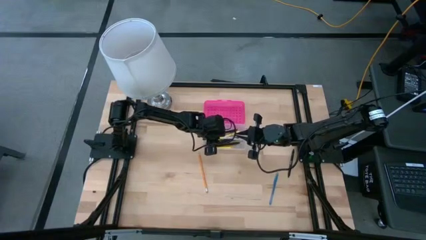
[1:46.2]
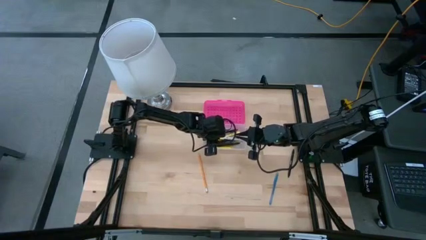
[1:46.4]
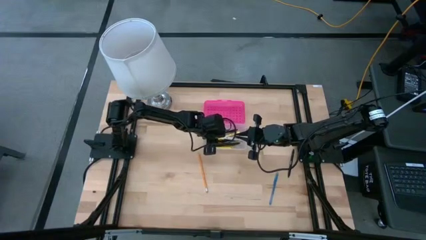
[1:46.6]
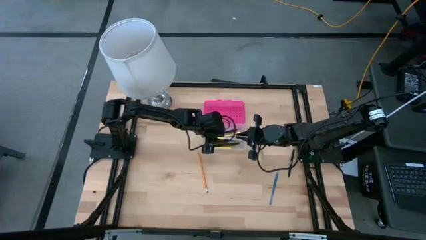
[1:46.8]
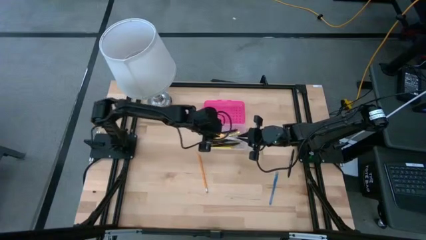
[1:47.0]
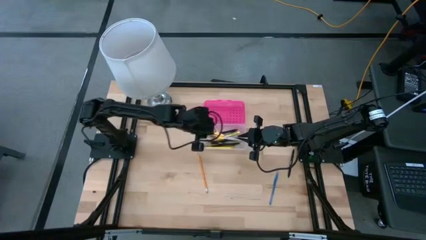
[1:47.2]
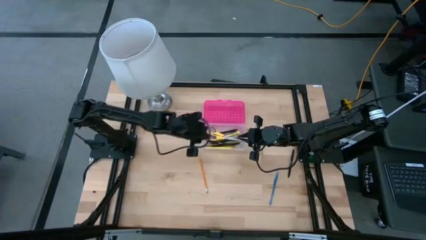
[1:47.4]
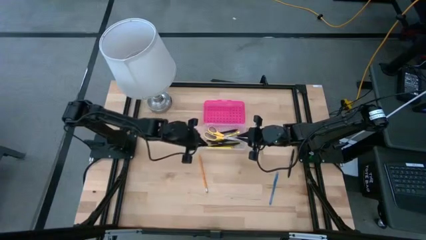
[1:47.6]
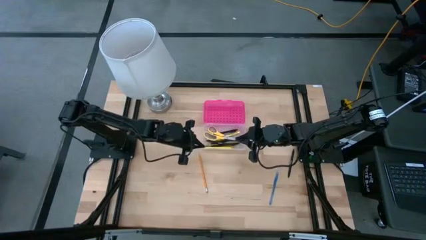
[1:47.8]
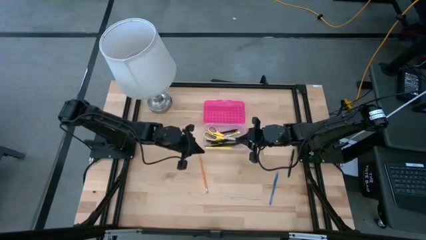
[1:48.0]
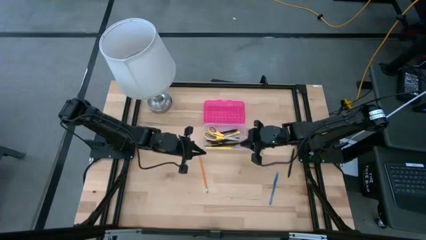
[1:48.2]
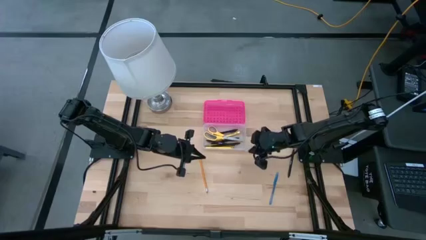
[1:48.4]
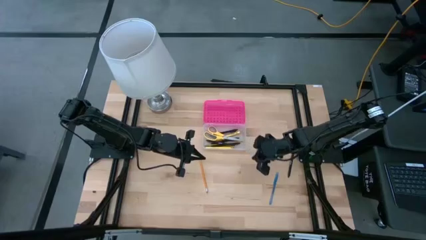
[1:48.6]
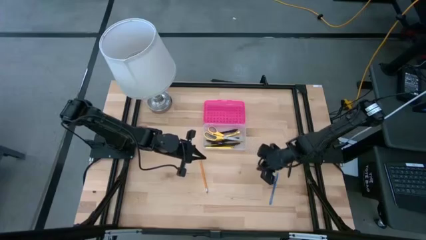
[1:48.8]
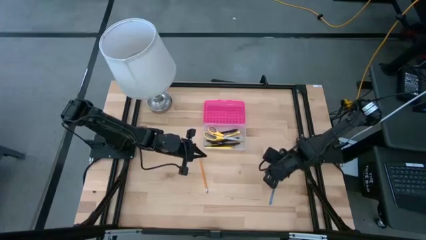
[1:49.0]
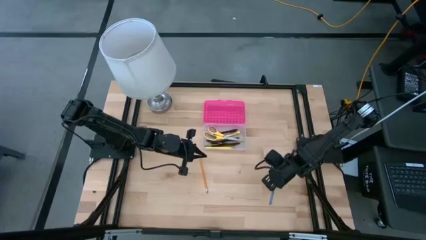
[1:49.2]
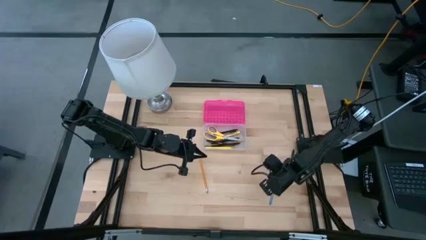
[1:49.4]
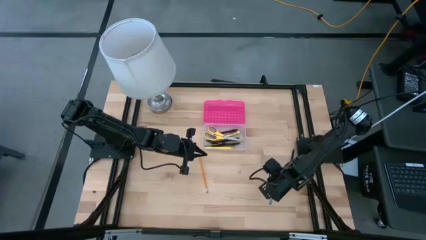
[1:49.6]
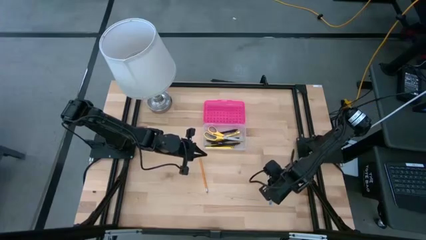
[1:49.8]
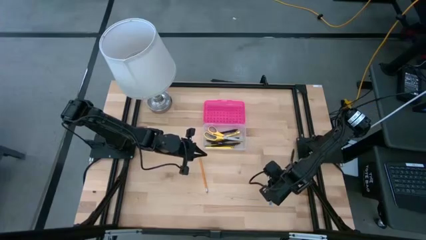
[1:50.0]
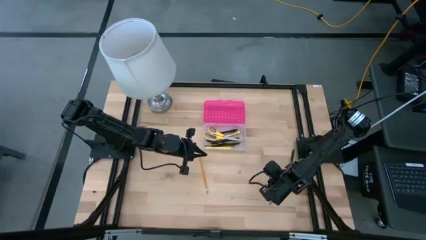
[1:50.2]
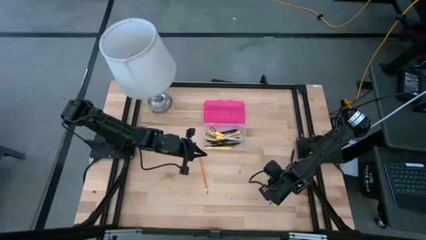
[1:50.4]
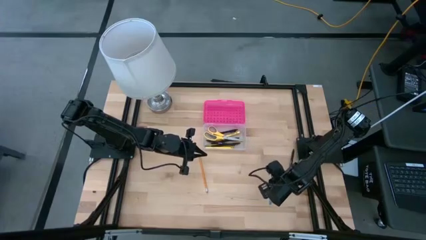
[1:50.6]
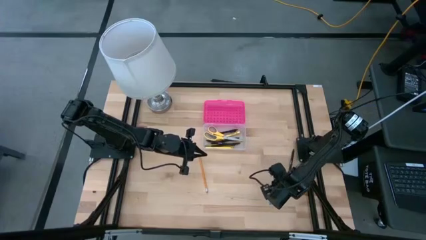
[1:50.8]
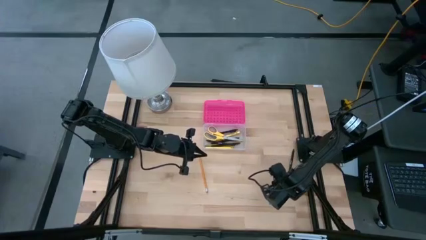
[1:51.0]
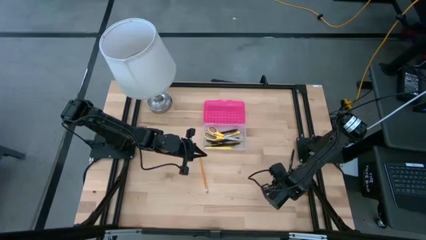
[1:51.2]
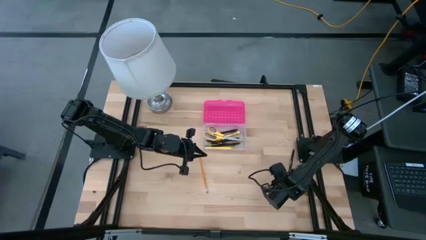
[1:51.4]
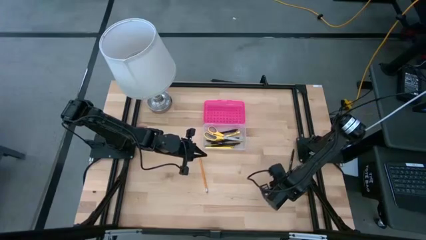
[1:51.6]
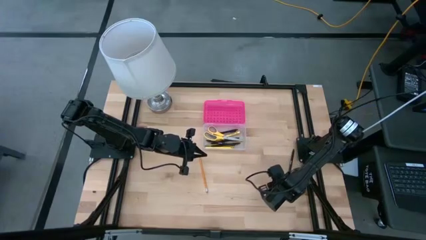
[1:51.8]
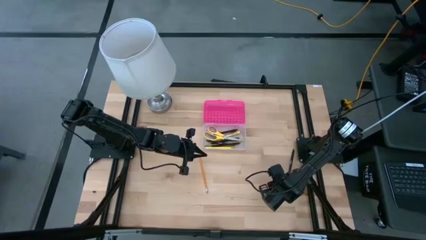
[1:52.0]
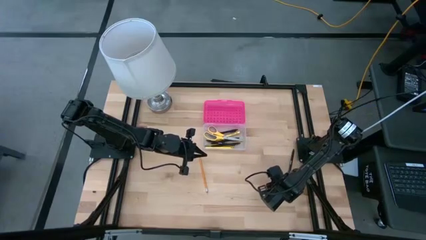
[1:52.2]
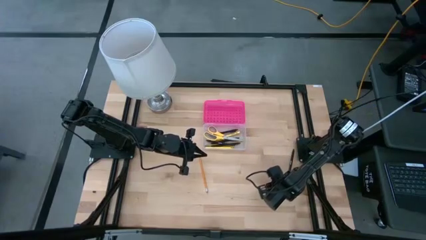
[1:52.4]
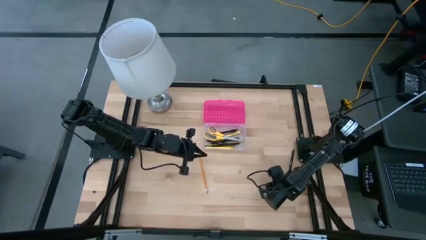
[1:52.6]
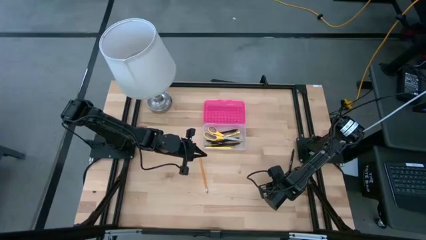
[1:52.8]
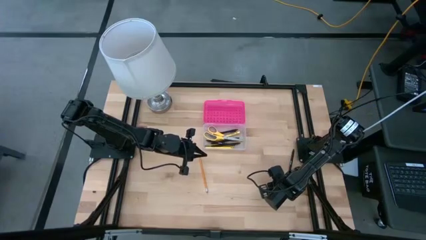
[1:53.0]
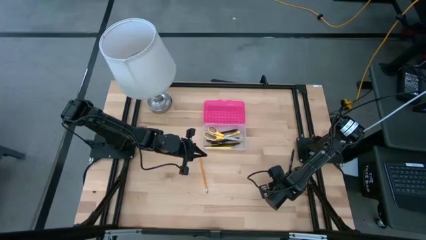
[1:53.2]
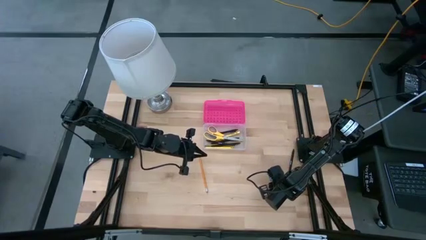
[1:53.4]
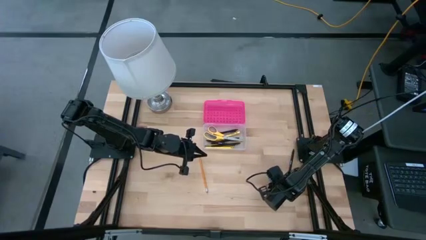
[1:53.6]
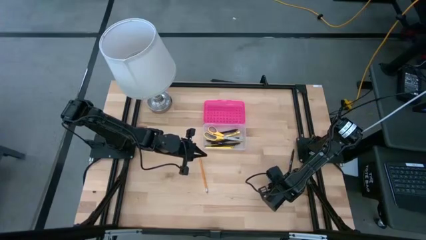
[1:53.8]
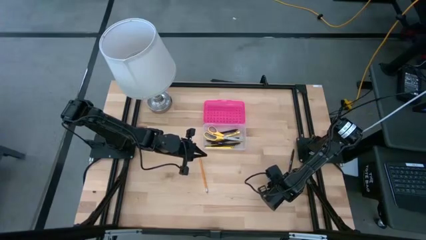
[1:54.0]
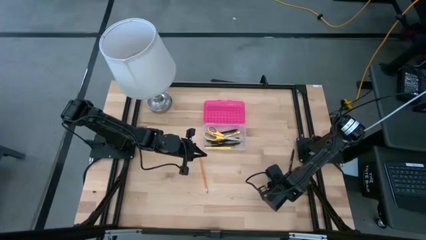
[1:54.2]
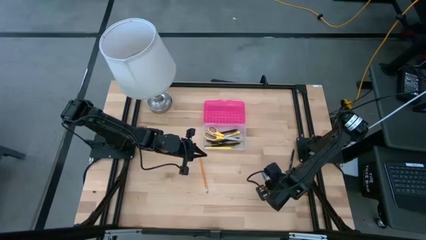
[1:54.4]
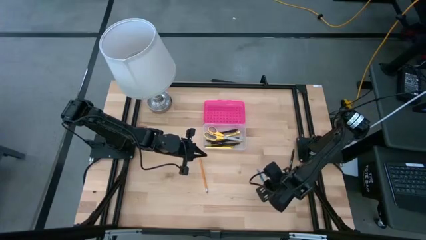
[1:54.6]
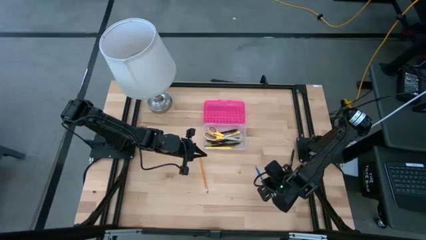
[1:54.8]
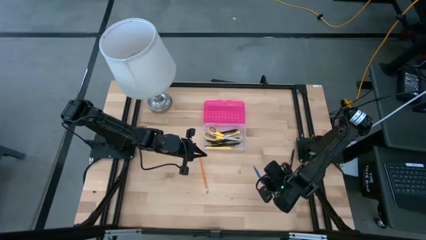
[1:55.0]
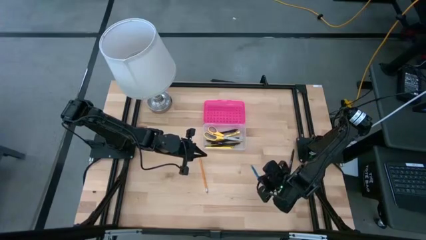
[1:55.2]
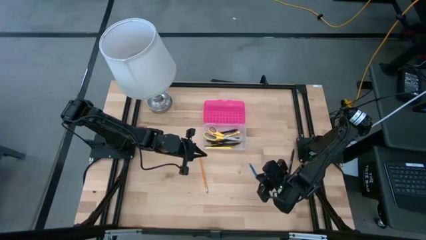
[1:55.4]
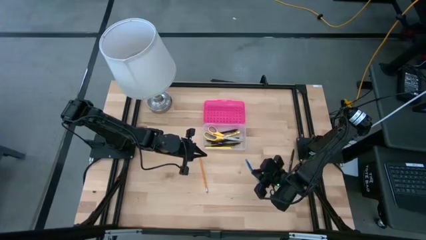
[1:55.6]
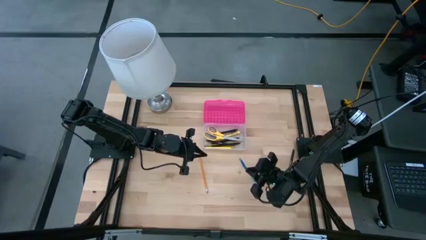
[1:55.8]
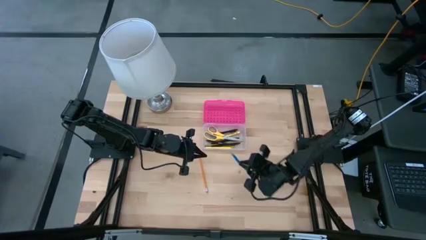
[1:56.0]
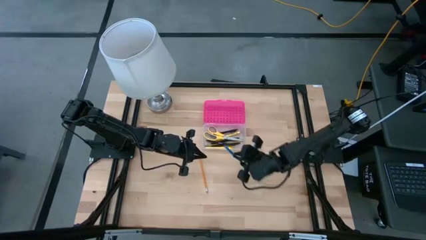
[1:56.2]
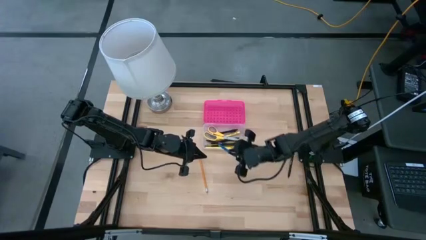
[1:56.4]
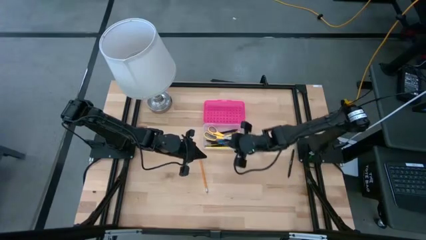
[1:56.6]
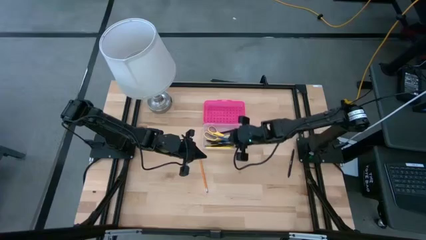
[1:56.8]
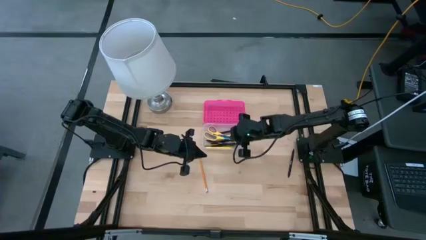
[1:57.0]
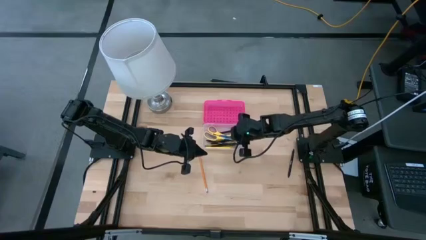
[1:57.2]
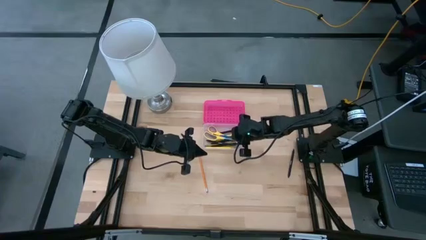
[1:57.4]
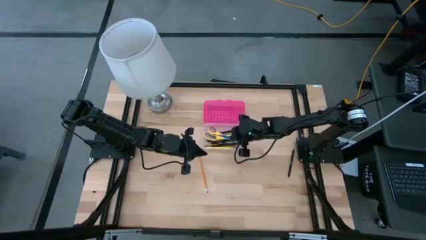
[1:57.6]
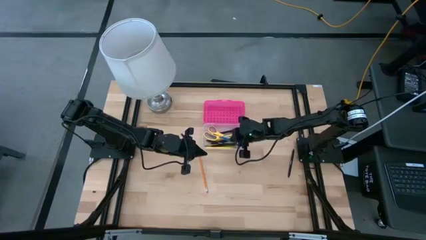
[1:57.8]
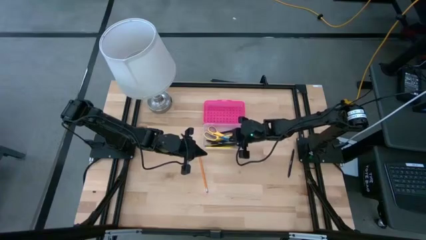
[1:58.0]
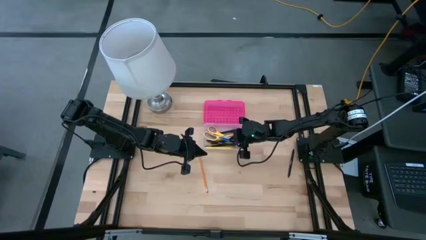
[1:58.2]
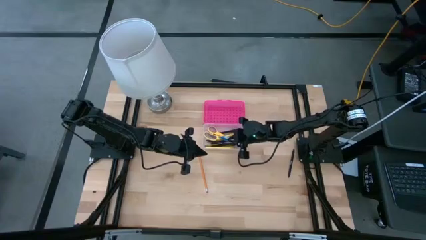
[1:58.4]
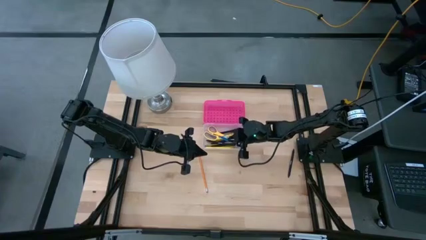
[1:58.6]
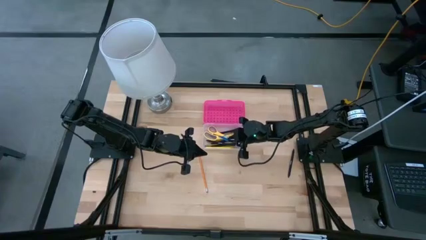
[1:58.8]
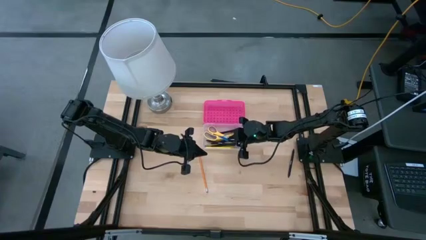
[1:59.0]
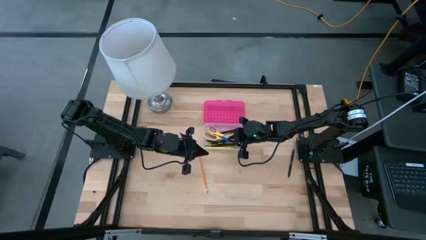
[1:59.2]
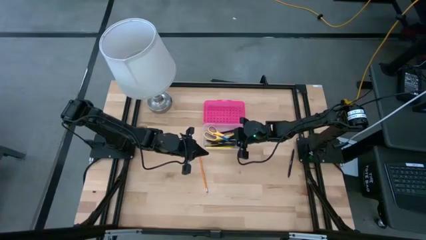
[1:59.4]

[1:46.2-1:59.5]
Task: Pick & place school supplies into a supply box
Put the blue pen into the pink supply box

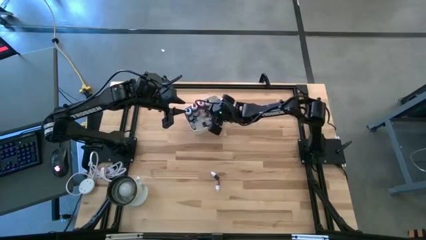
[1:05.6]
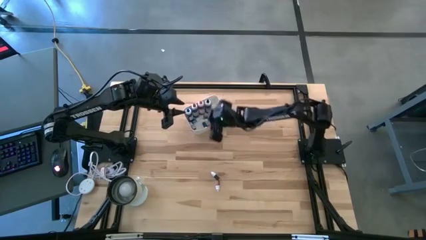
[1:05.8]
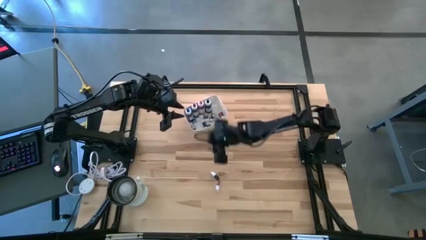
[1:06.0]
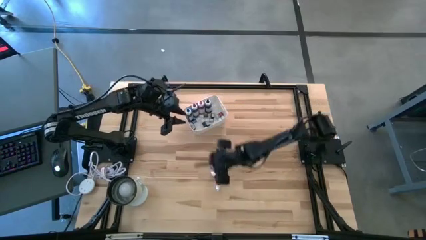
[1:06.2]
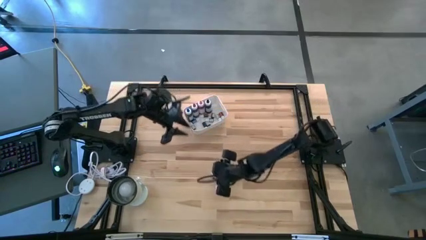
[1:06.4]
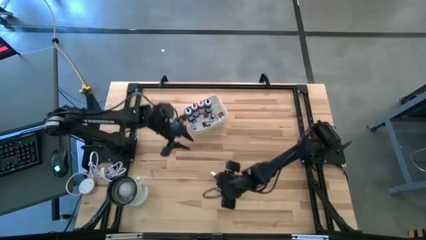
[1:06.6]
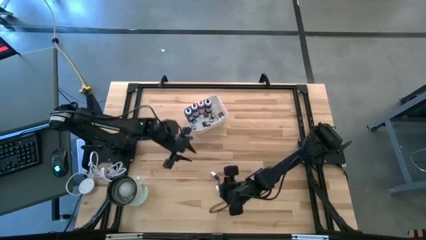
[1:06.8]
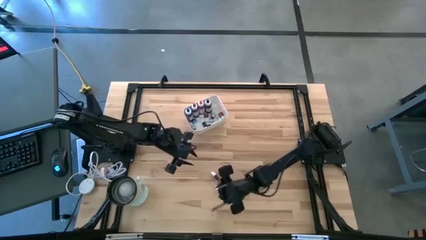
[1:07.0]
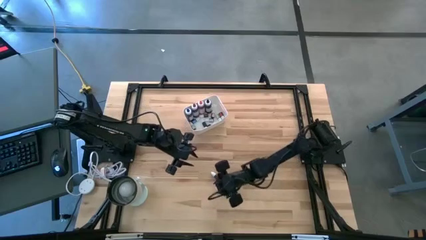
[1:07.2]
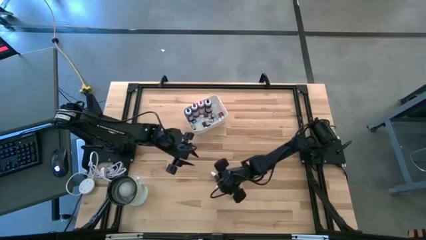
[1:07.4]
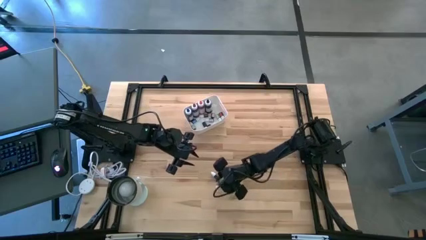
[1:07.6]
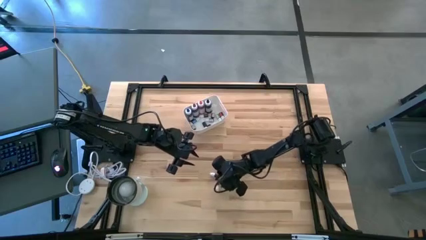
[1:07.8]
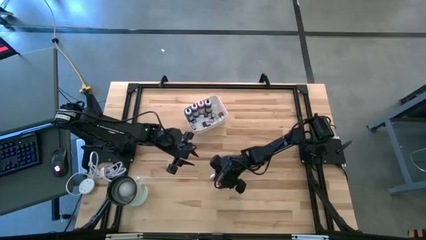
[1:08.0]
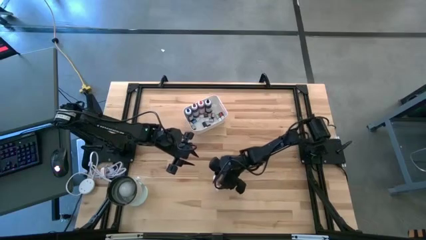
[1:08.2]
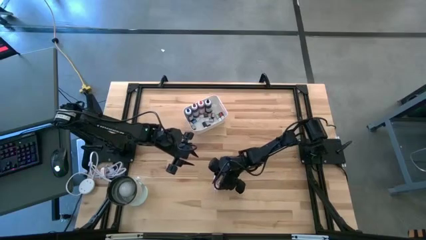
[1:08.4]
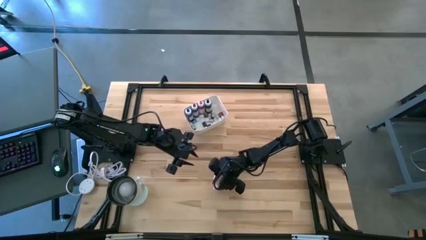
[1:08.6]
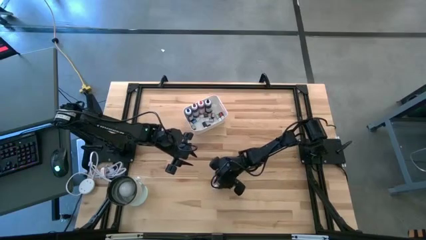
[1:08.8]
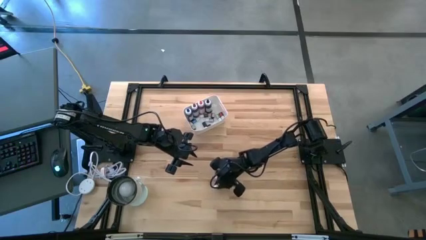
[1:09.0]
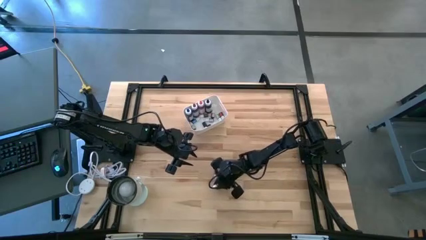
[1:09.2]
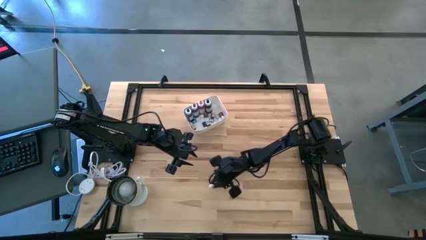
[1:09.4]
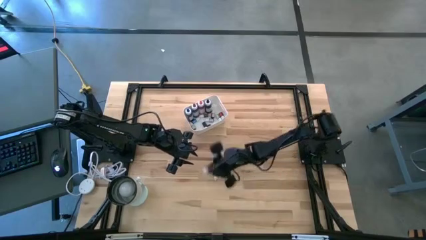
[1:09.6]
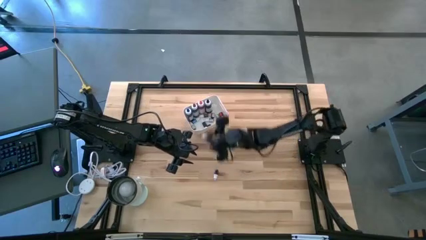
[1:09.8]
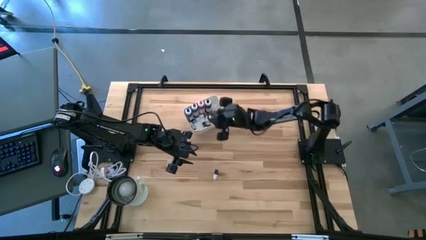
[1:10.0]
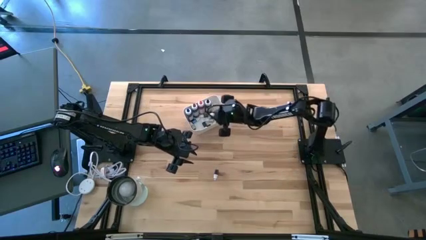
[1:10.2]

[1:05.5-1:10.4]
Task: Pick & Place food coloring
Put the small orange food coloring bottle into the white bin
